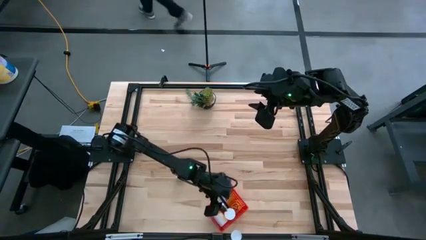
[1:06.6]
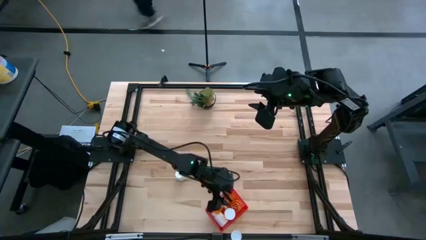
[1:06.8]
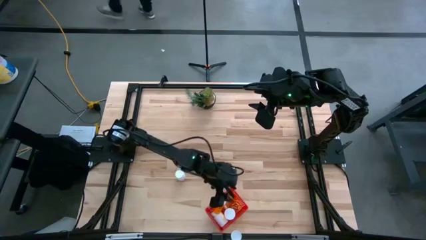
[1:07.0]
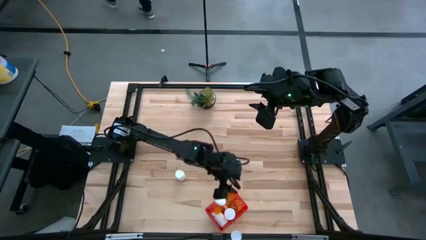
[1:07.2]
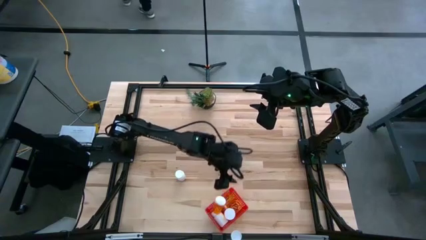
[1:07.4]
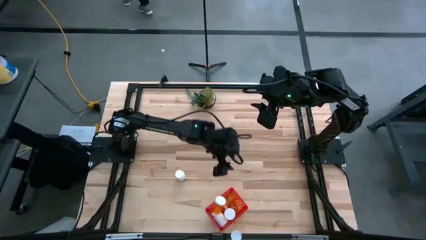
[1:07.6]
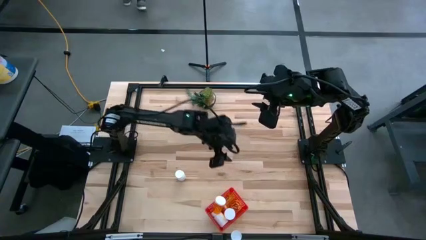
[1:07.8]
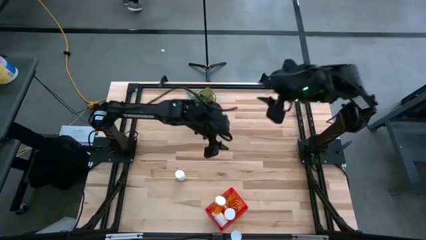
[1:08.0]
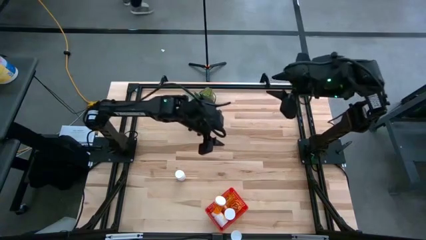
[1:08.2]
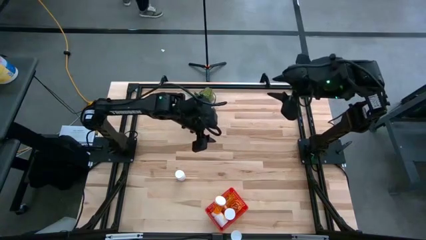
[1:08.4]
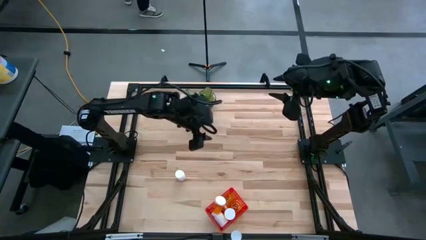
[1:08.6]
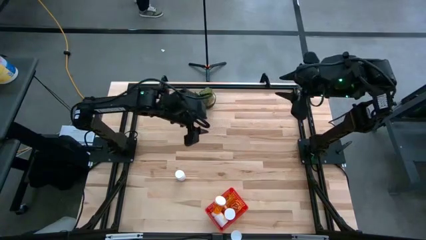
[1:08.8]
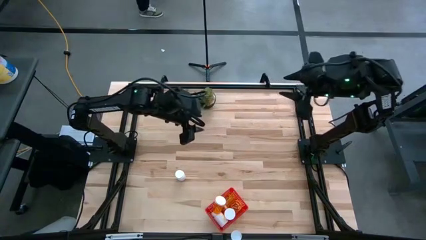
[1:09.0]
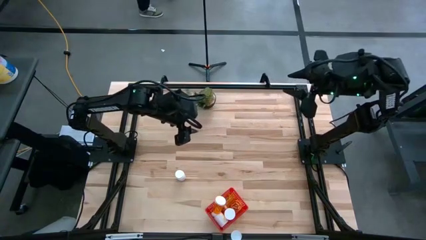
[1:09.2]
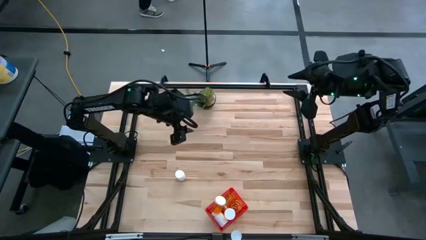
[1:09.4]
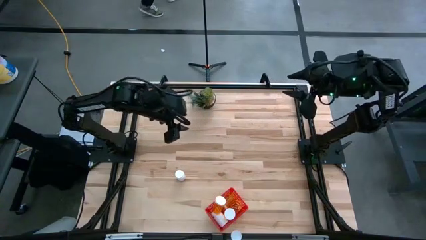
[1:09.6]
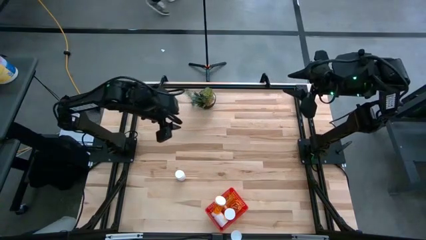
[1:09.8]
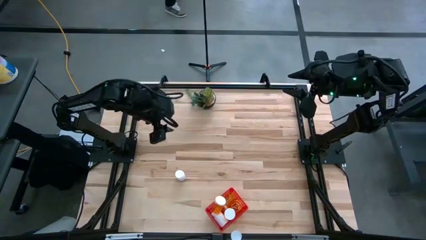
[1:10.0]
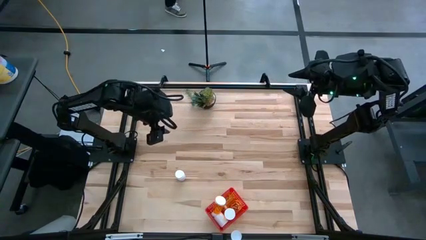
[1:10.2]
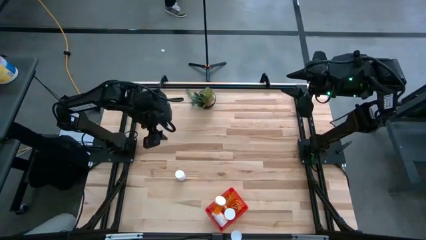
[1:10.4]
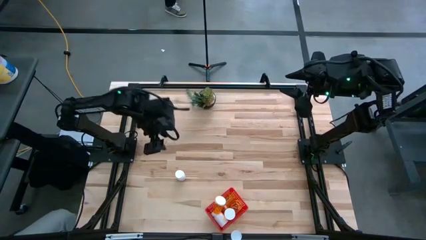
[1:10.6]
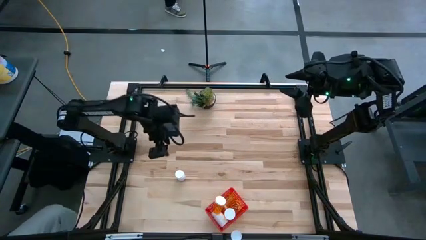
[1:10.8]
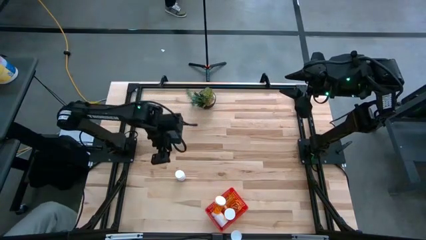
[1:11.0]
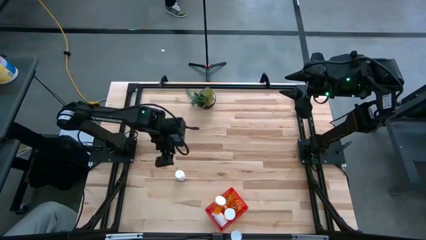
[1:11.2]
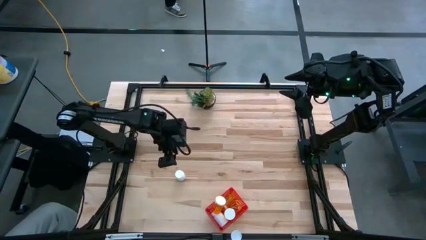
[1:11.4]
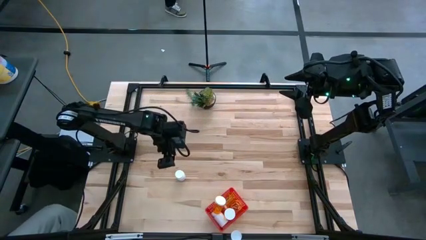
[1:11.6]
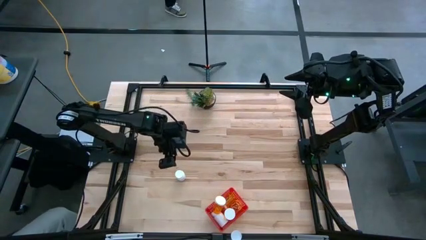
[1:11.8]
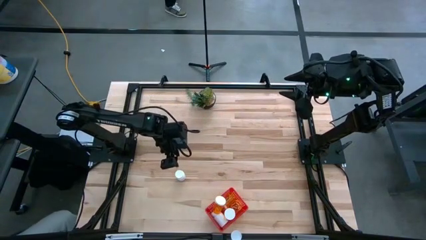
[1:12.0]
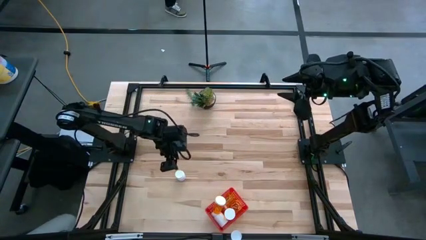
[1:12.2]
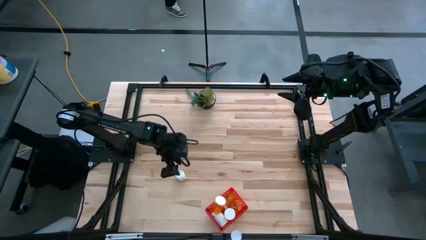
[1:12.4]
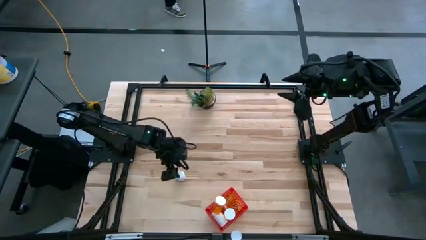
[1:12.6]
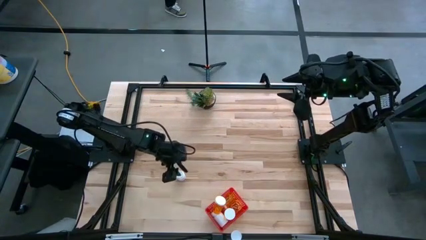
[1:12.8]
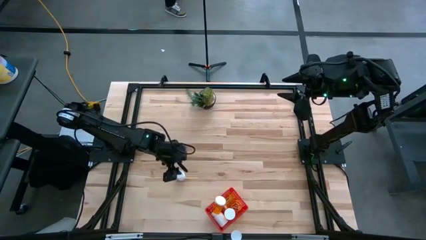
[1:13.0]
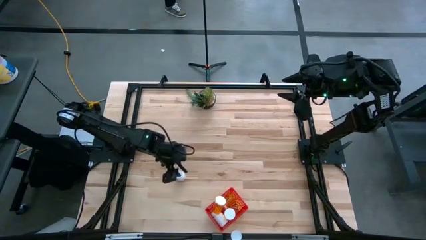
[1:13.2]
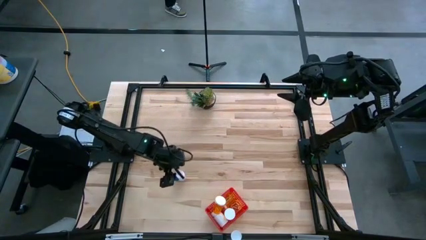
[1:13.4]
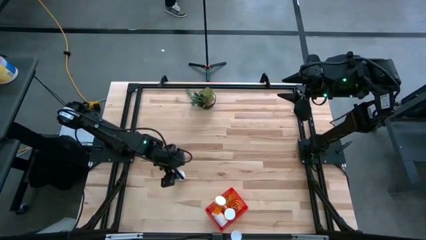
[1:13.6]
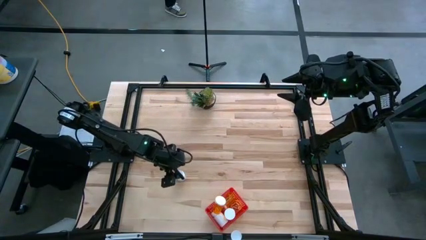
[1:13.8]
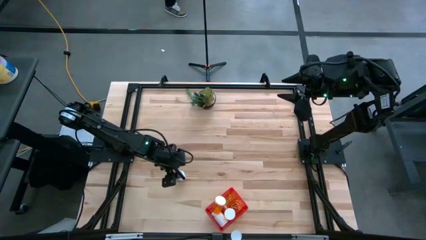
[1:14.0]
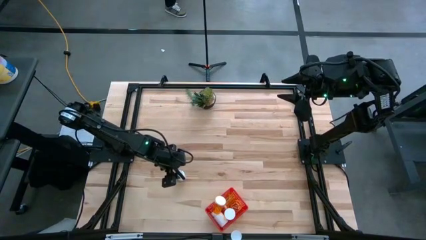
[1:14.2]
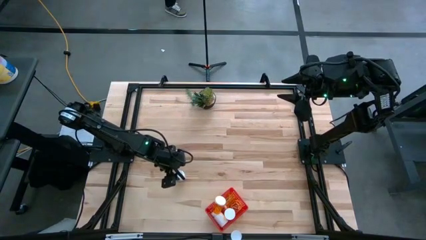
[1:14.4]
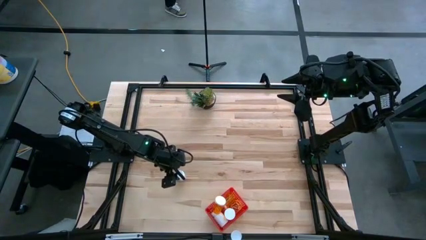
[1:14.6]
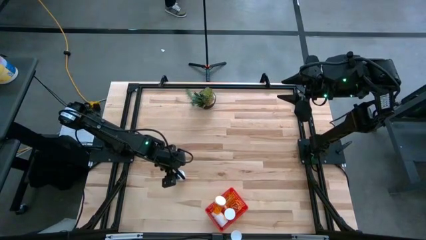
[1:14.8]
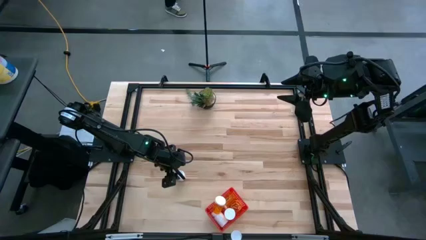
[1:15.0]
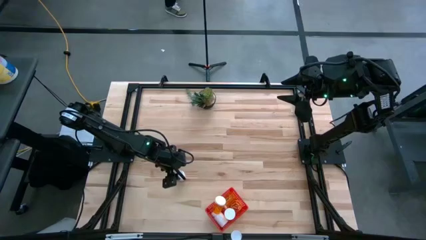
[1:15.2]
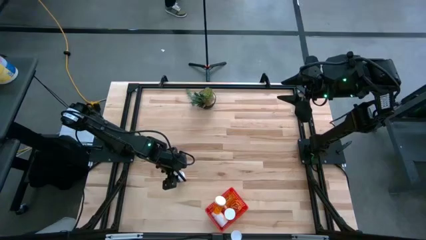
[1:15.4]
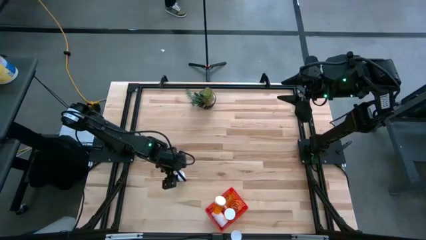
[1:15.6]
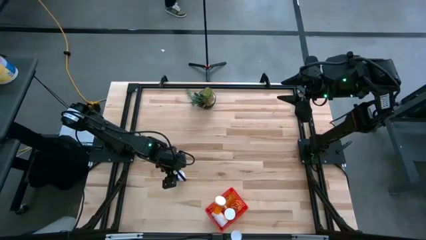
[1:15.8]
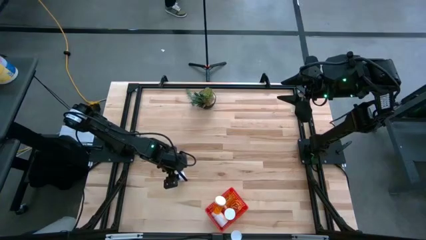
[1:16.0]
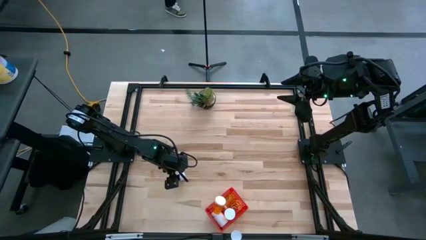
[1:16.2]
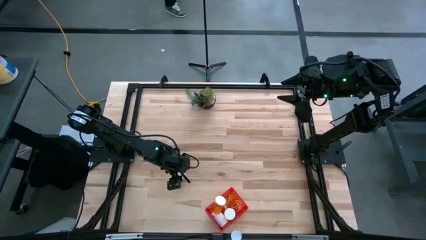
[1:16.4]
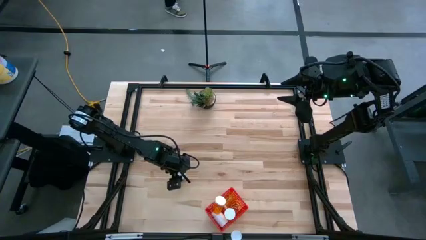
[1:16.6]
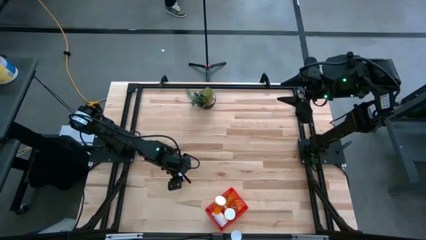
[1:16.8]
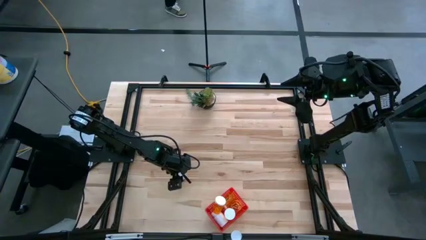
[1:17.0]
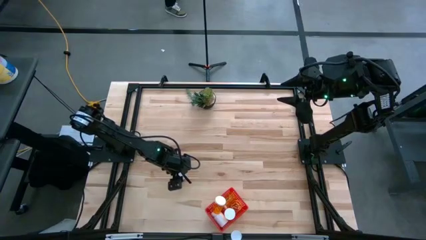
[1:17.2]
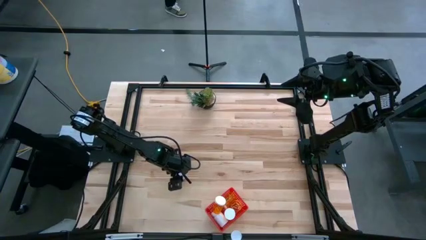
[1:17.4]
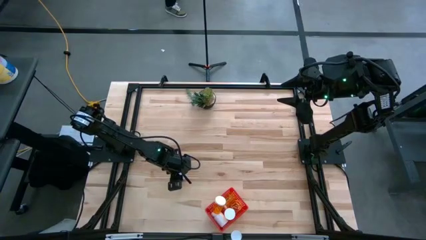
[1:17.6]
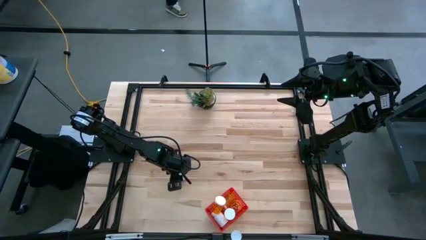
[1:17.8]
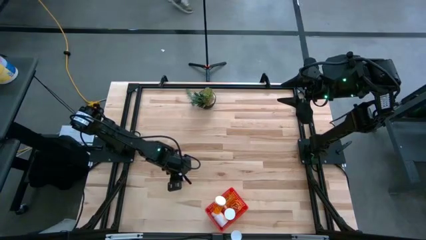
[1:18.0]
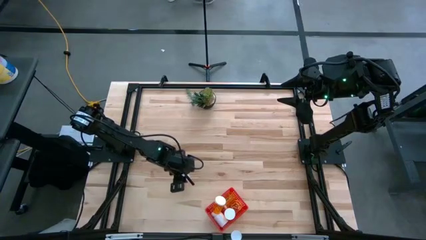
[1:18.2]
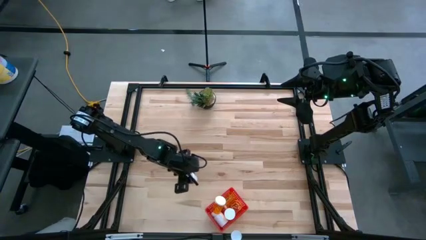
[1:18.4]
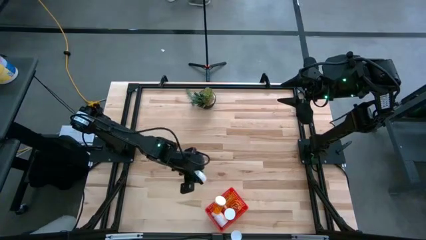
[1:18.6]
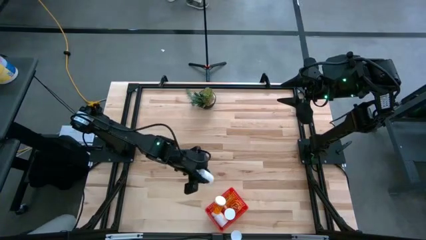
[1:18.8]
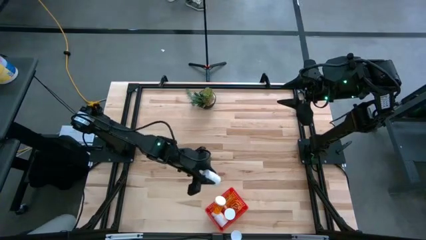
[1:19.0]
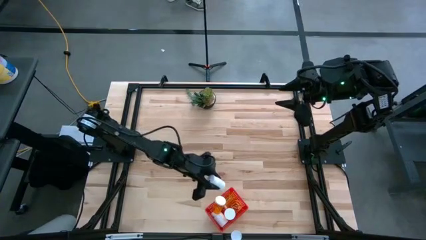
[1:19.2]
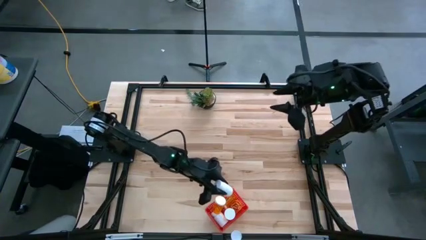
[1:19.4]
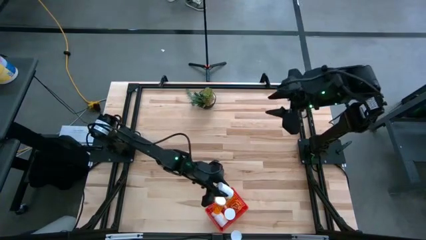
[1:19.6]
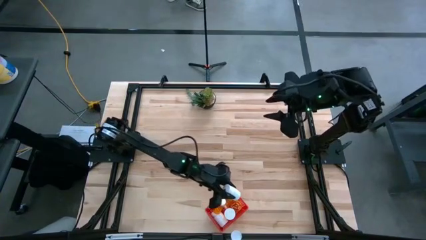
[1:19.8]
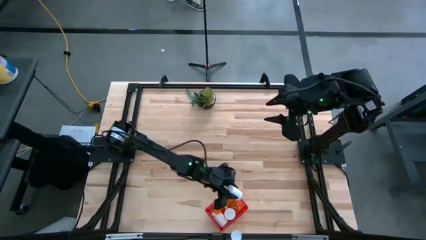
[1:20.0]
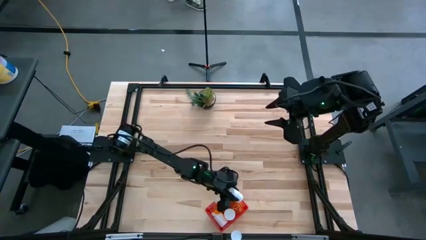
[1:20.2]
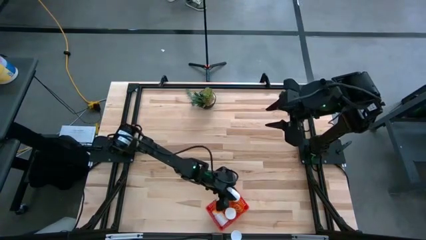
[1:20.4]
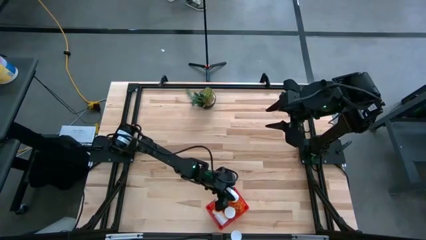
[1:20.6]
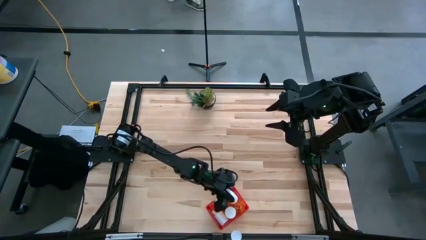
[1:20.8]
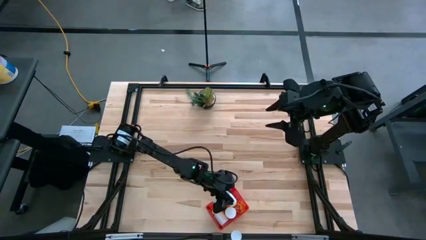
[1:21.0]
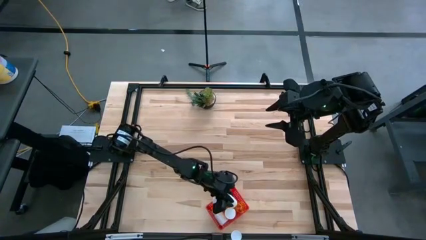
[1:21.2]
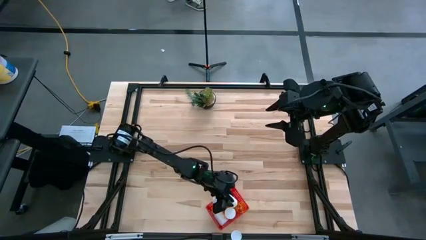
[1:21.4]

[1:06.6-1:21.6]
Task: Pick and place pill bottles into a basket
Put the white pill bottle into the red bin

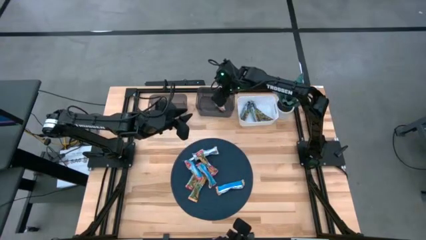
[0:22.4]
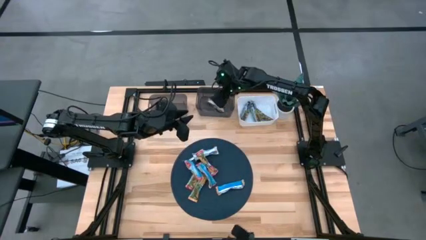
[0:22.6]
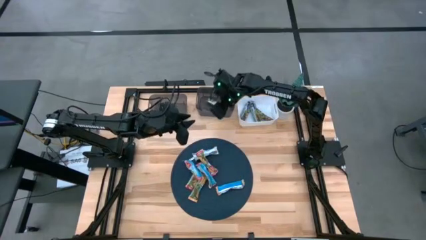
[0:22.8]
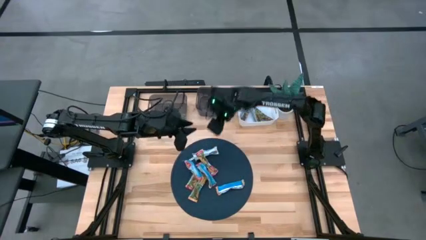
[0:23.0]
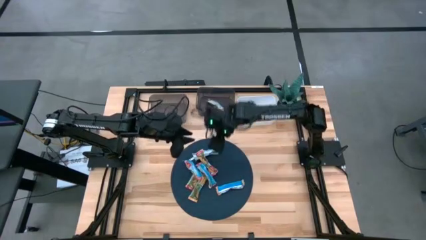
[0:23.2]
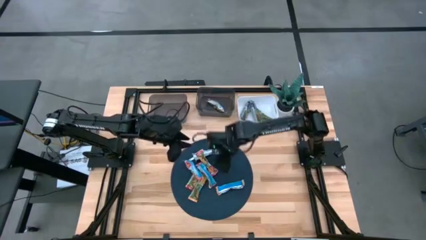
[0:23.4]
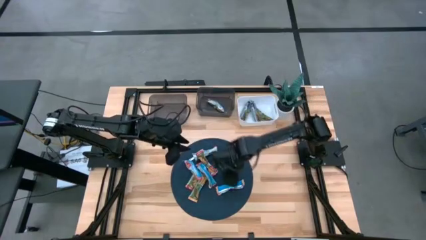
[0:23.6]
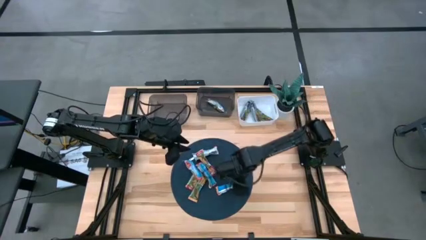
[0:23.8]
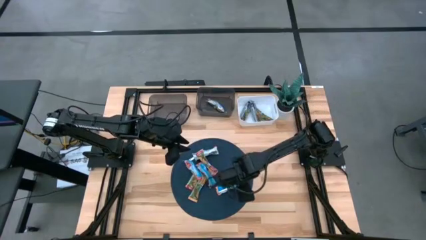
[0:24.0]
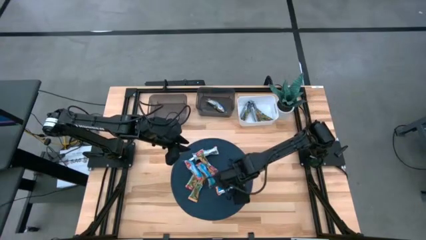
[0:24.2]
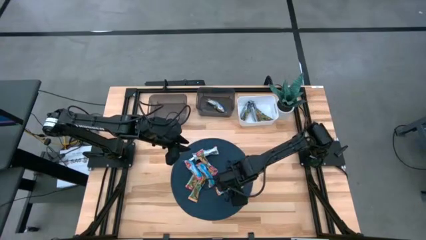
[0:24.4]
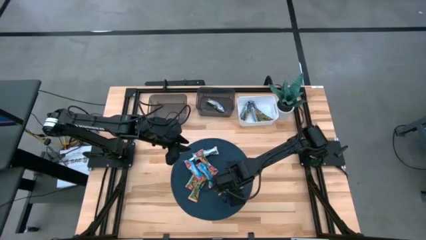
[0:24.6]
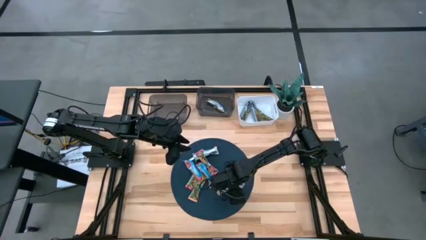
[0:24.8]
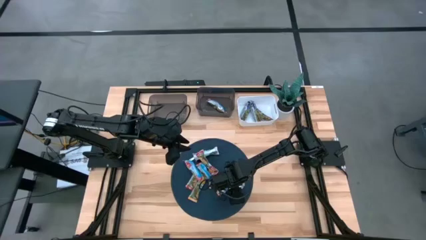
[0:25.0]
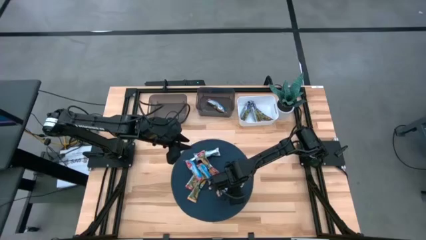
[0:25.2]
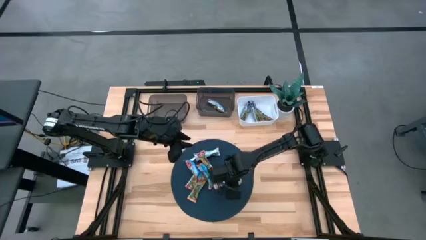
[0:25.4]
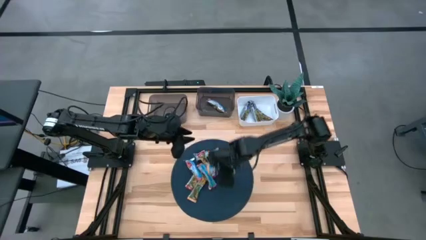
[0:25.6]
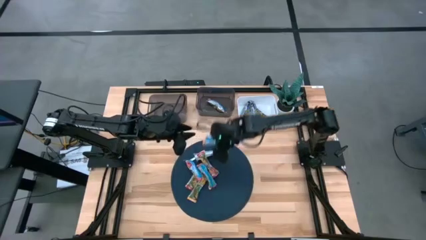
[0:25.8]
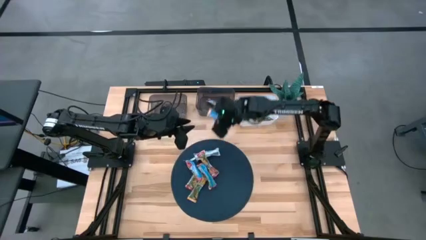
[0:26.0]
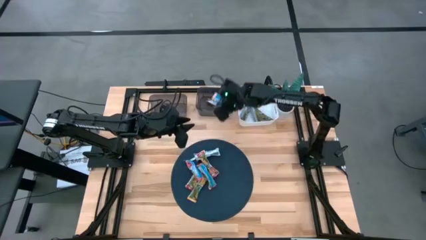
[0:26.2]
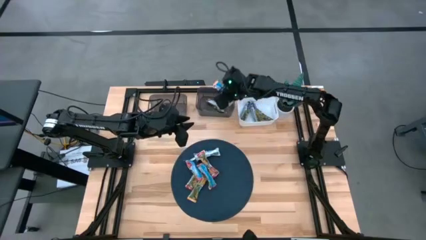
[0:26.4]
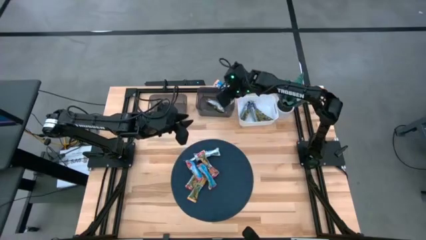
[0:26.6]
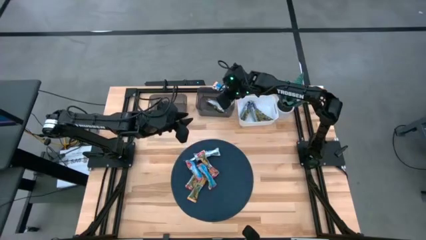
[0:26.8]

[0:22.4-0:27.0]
Task: Pick and place Granola Bars by type
Put the yellow granola bar into the right black bin
